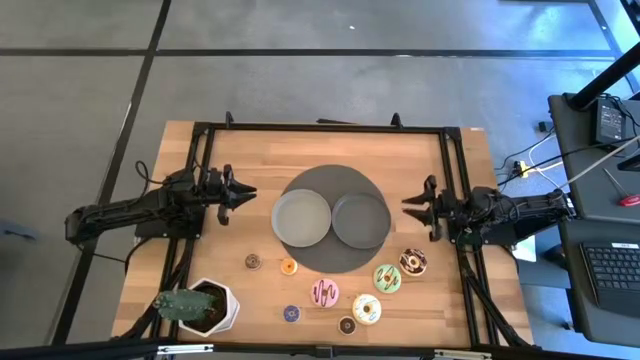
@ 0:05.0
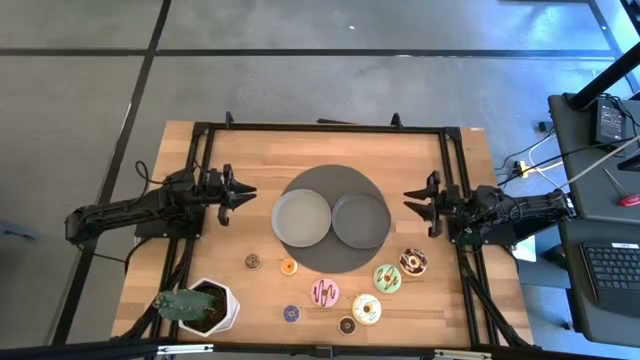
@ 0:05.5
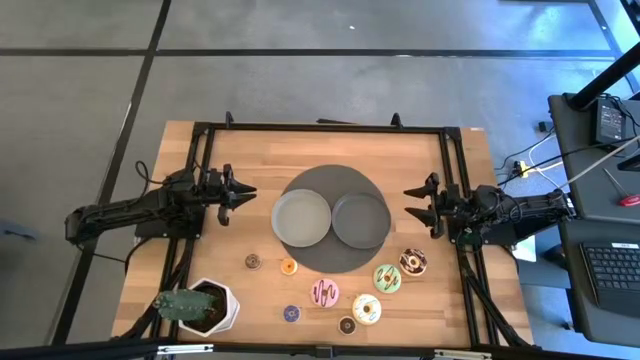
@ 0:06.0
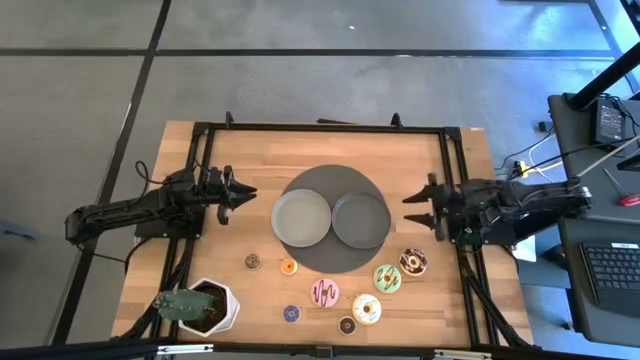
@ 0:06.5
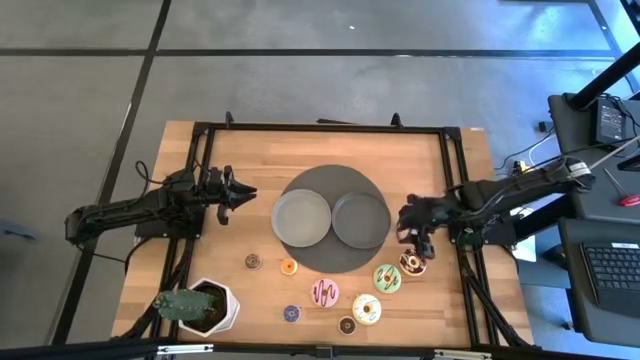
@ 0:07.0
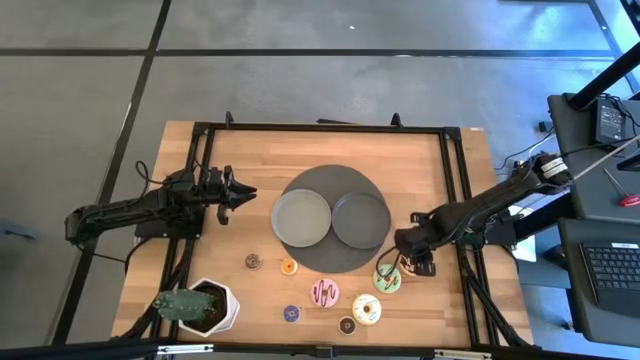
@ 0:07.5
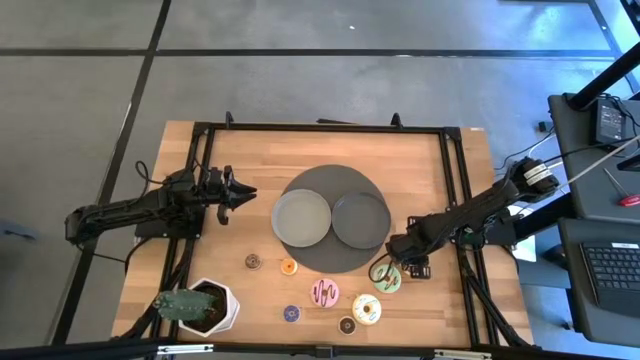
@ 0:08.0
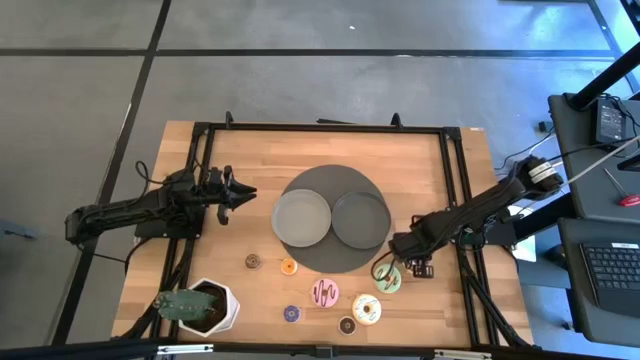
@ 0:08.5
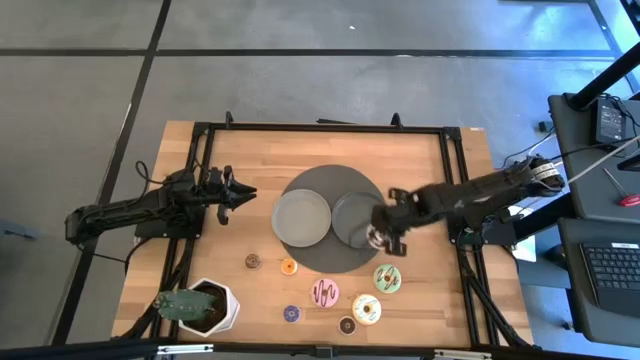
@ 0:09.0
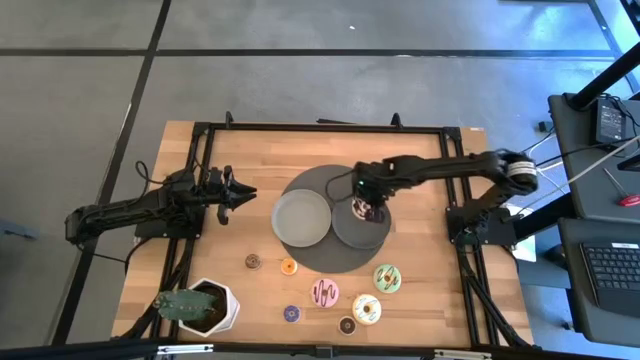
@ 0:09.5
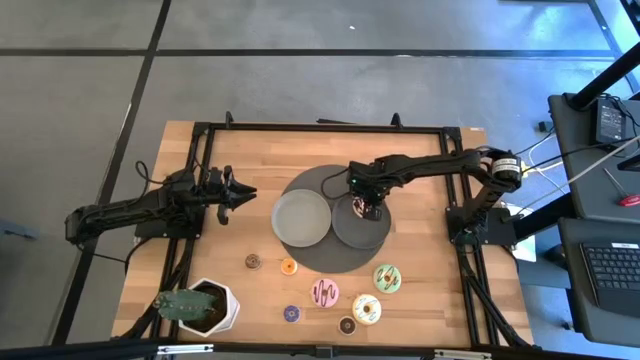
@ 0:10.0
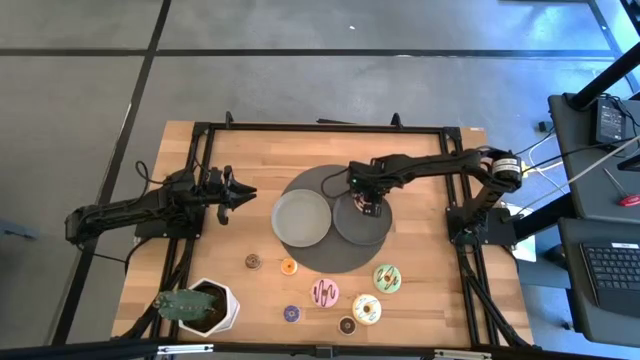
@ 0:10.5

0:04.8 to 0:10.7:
Task: Pick & Place donuts
Put the large black donut on the black plate

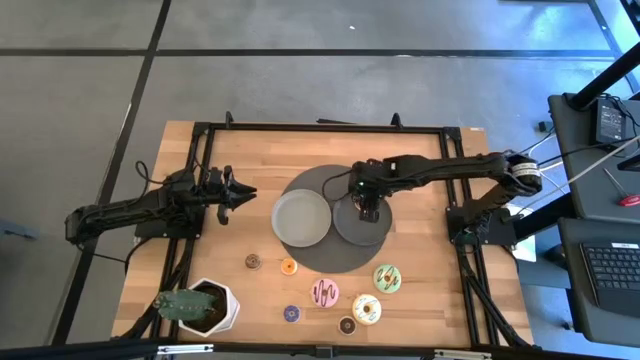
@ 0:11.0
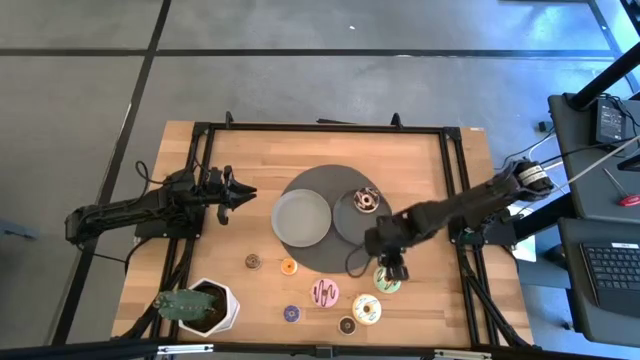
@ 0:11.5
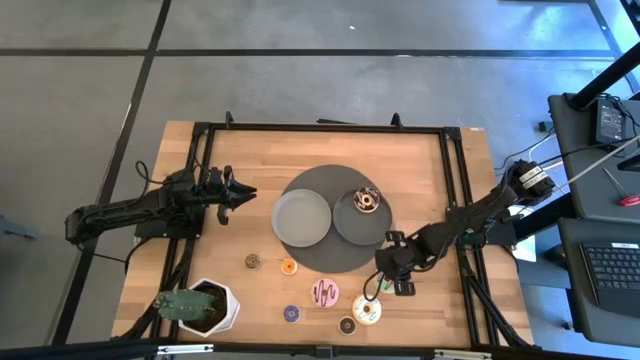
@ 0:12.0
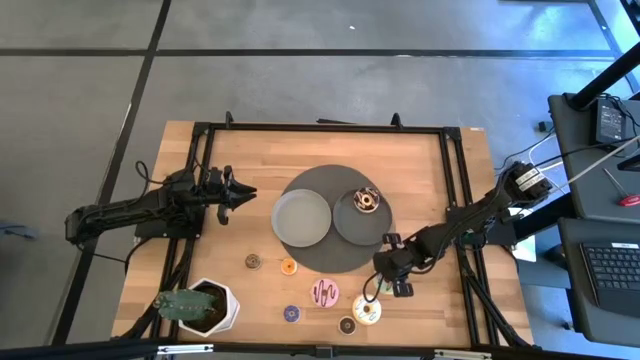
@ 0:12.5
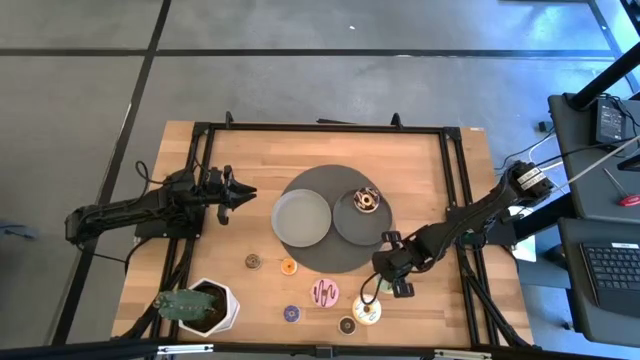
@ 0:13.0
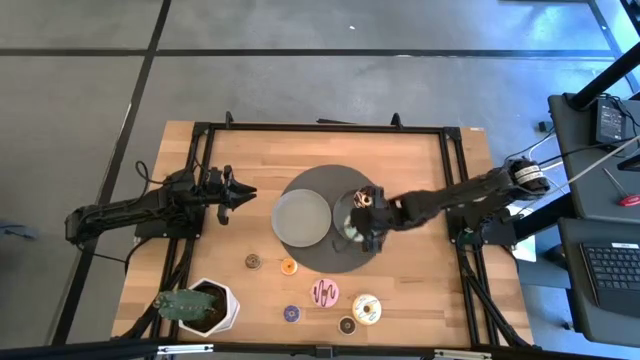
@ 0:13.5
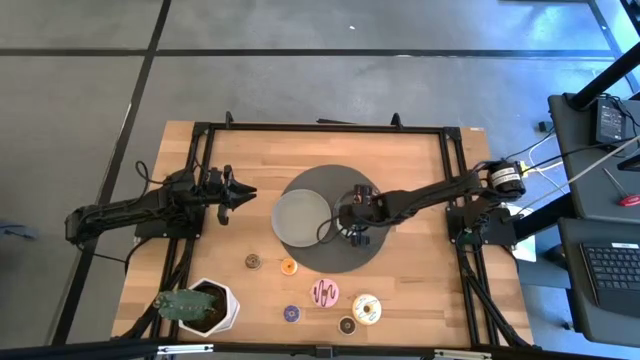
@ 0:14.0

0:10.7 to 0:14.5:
Put the large light green donut on the black plate

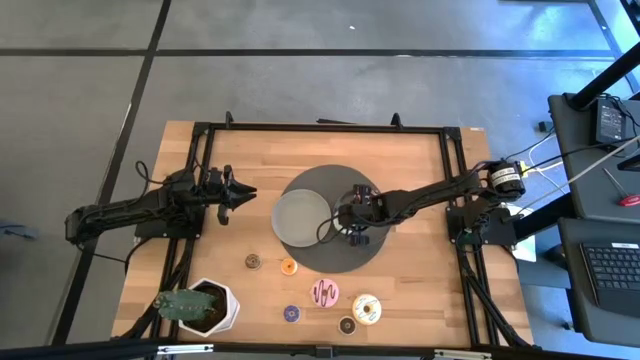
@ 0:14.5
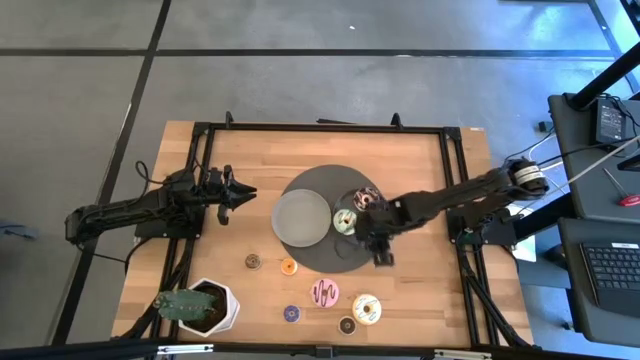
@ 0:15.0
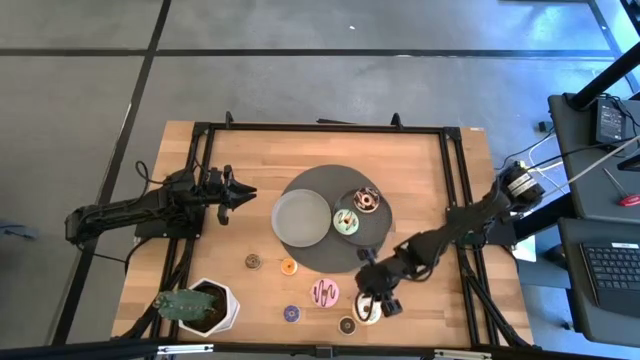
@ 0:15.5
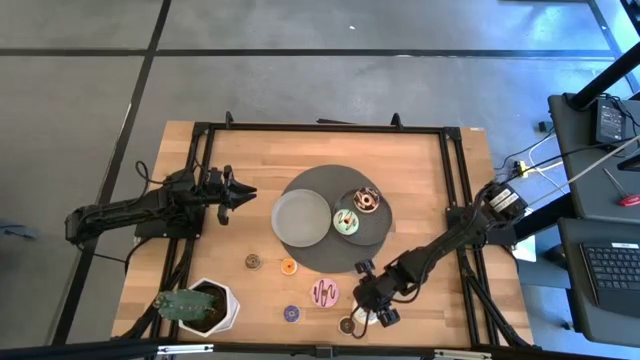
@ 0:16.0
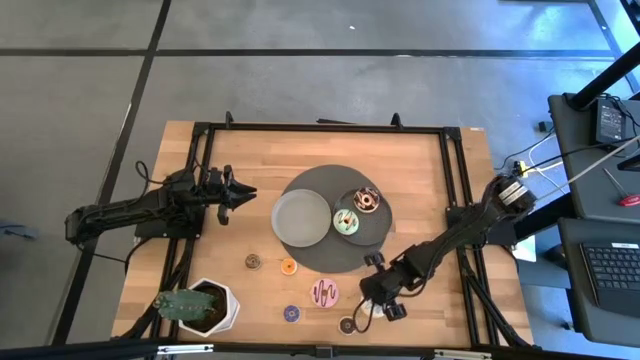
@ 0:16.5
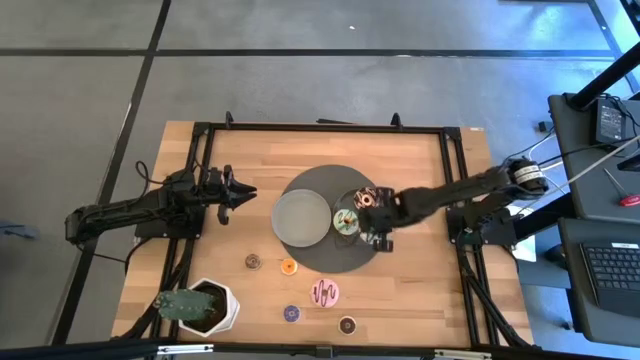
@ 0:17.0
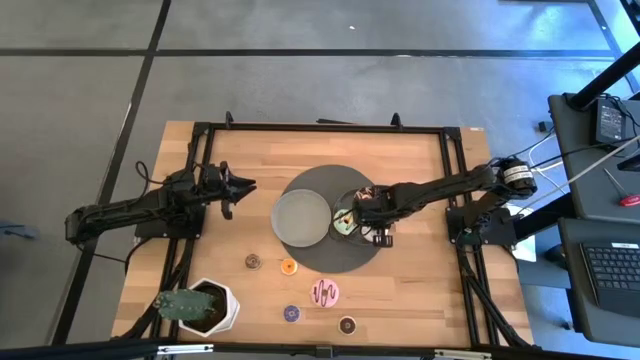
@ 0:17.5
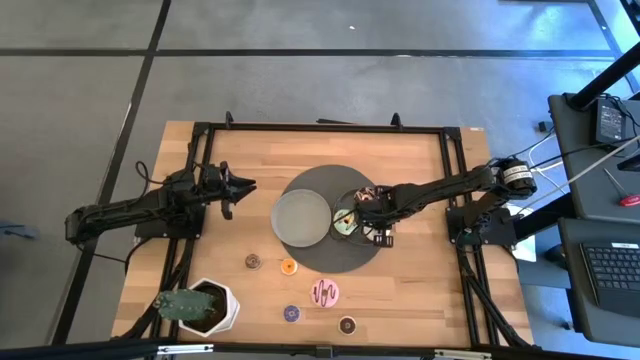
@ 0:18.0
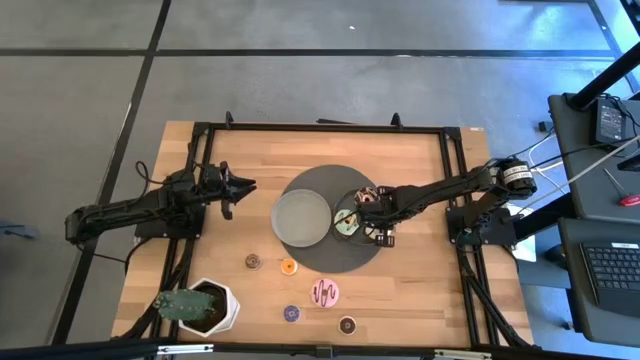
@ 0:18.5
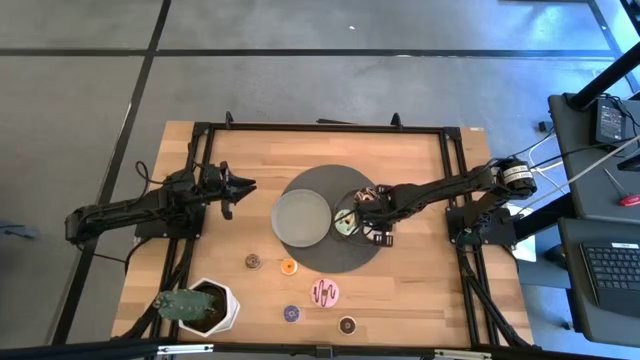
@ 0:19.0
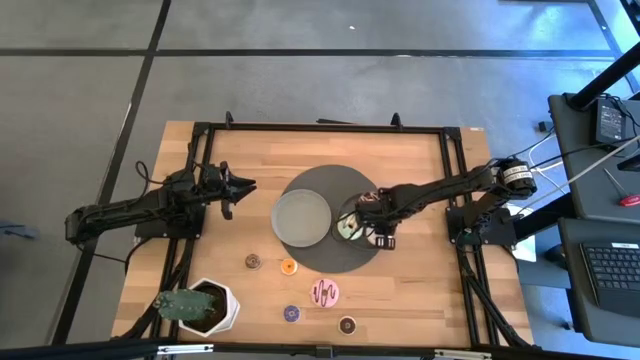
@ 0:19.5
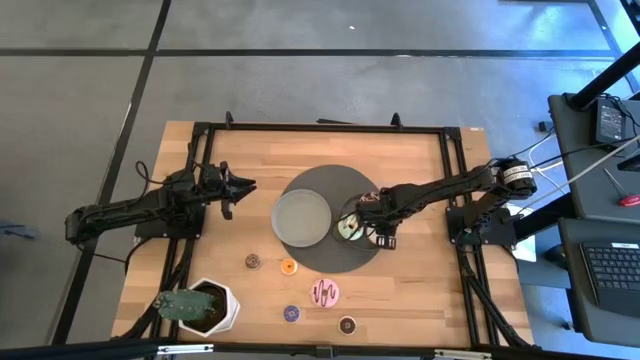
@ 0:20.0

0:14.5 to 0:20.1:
Put the large white donut on the black plate

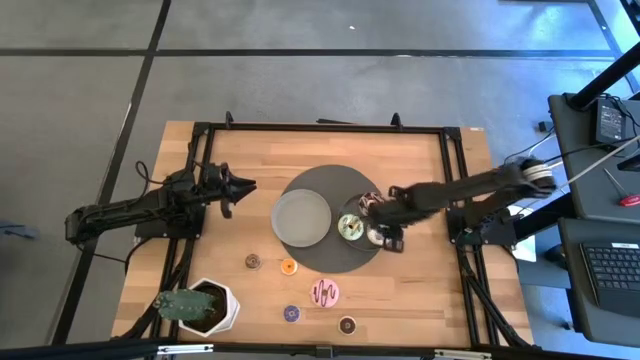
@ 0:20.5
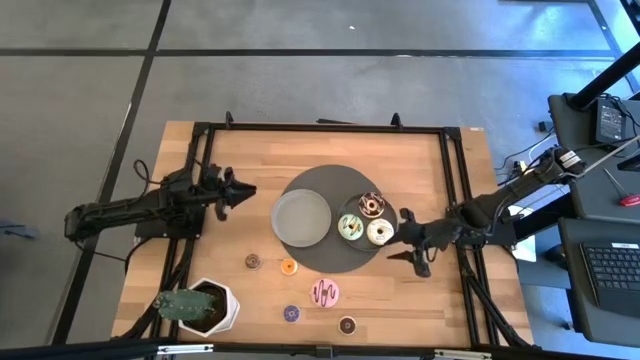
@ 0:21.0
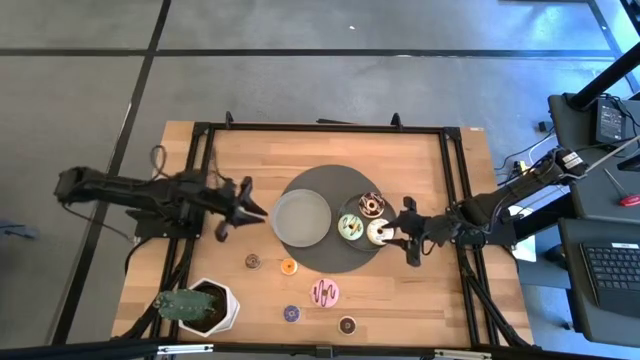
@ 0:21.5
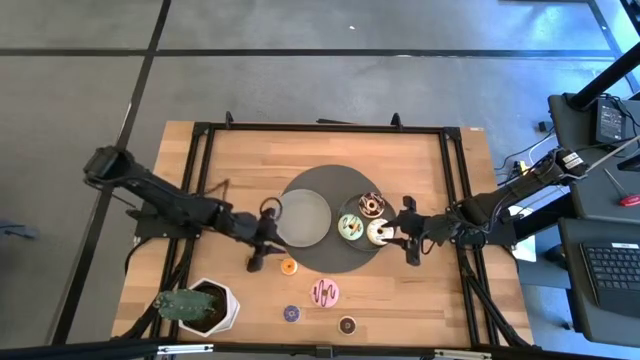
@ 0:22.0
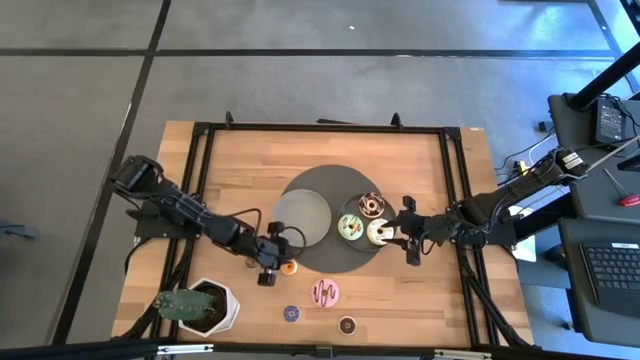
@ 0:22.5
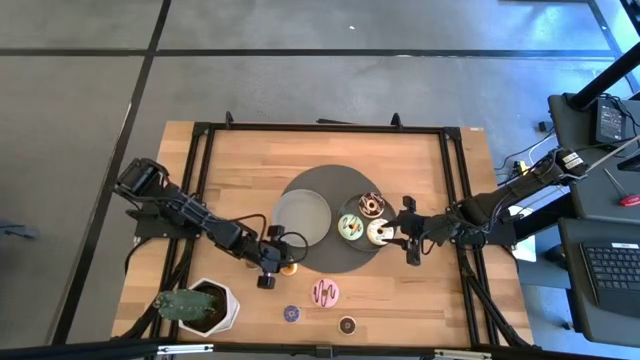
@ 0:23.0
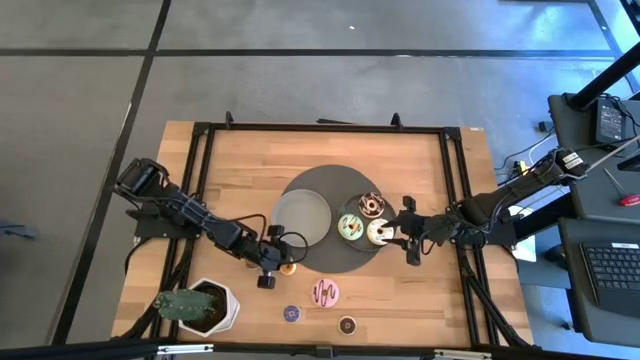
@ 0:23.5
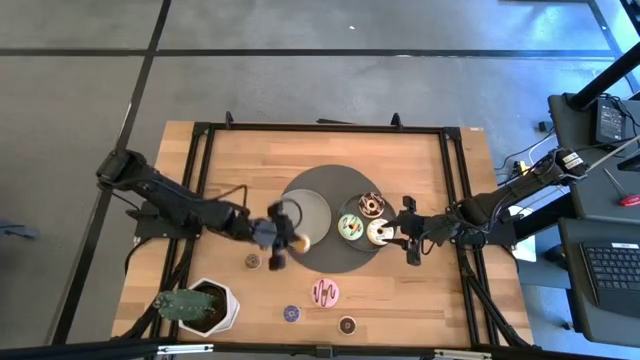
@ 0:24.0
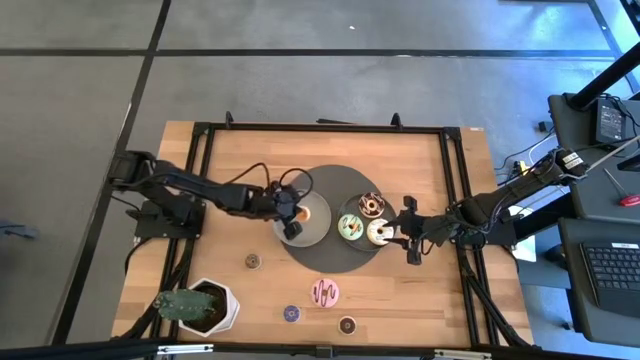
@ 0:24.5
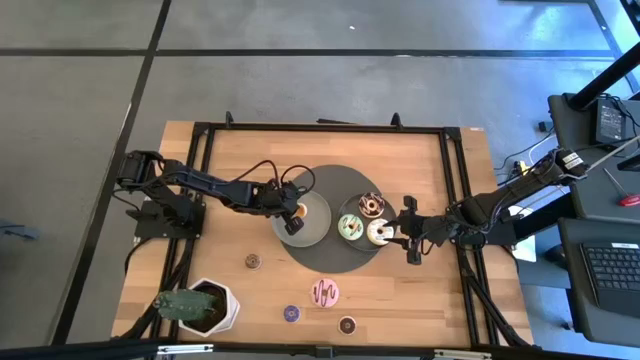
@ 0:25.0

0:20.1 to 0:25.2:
Put the small orange donut on the gray plate
